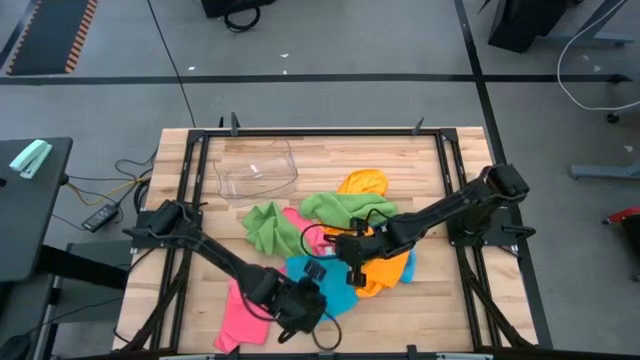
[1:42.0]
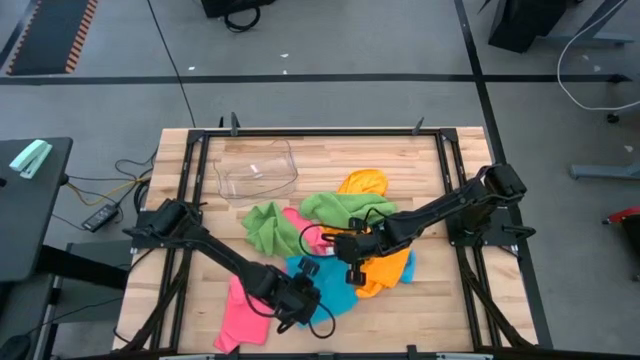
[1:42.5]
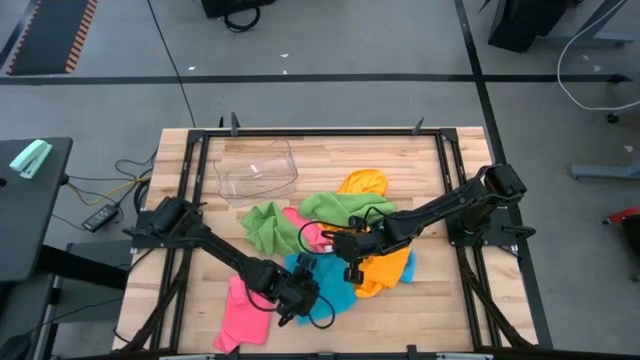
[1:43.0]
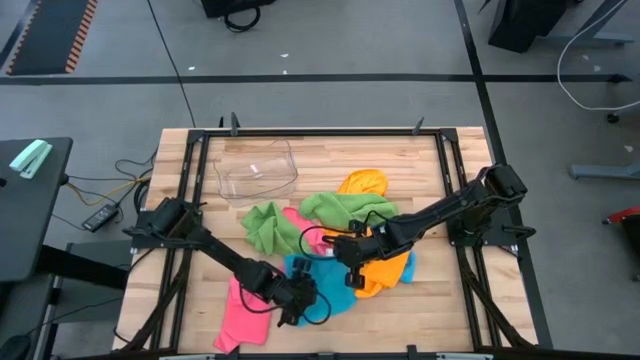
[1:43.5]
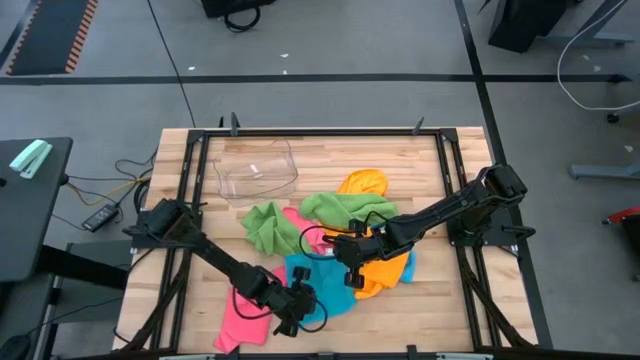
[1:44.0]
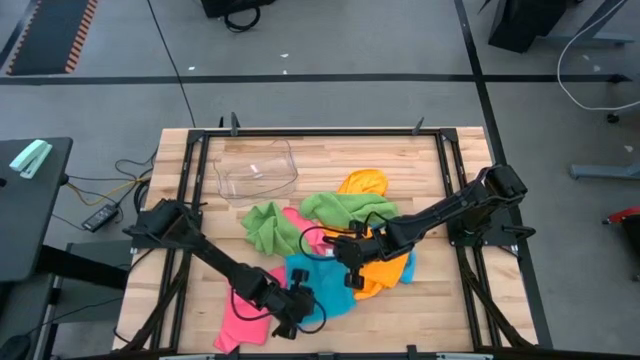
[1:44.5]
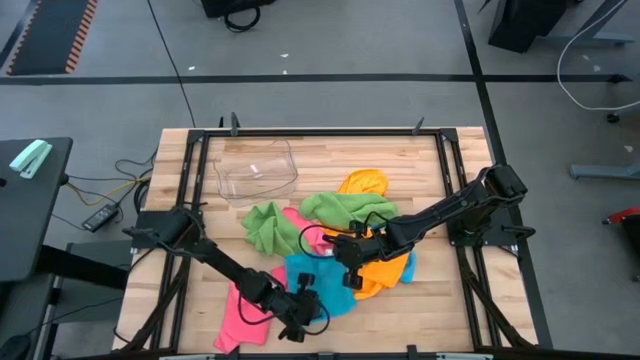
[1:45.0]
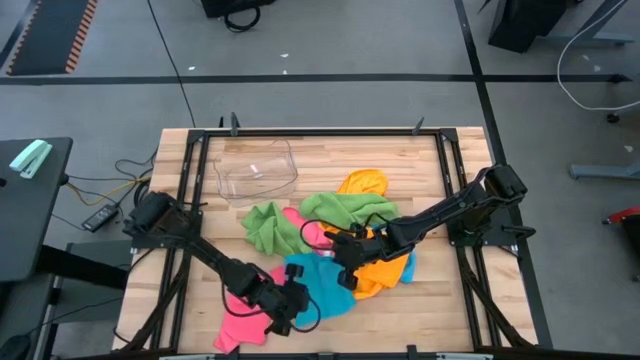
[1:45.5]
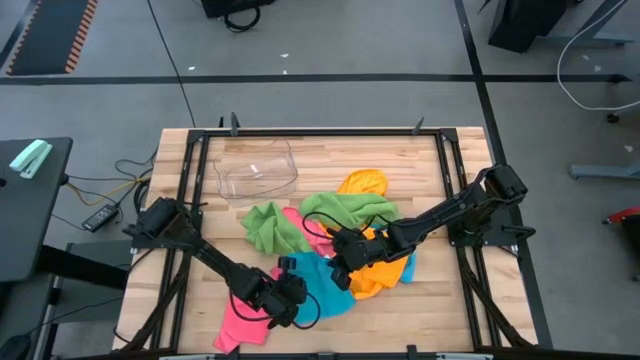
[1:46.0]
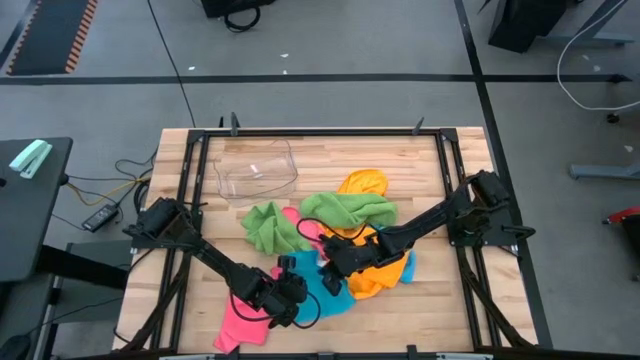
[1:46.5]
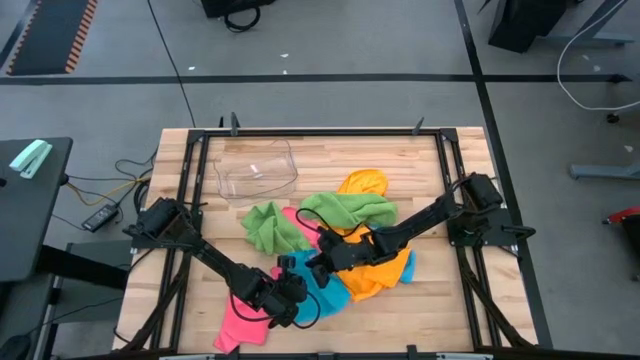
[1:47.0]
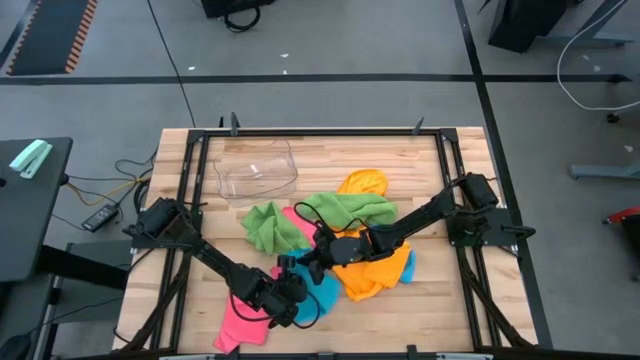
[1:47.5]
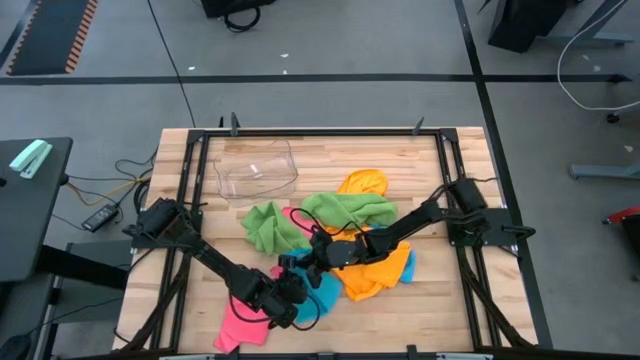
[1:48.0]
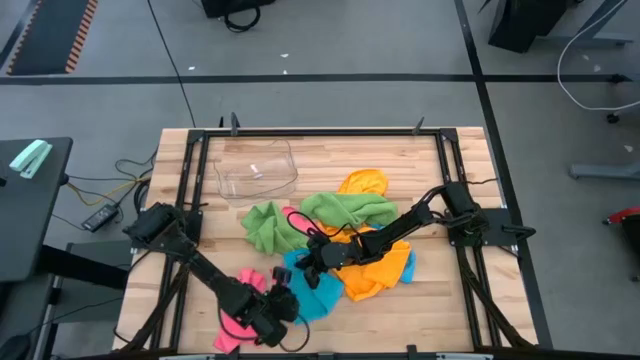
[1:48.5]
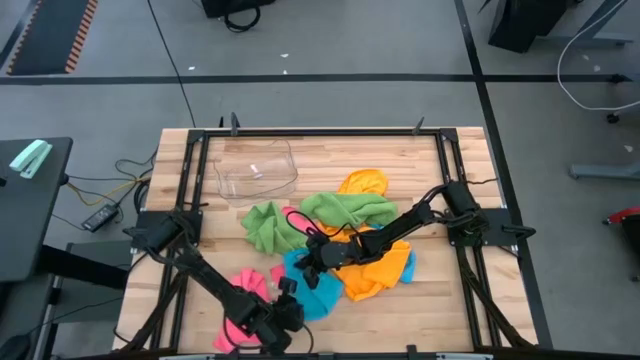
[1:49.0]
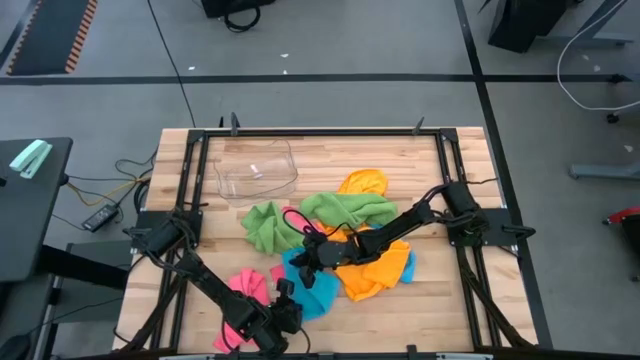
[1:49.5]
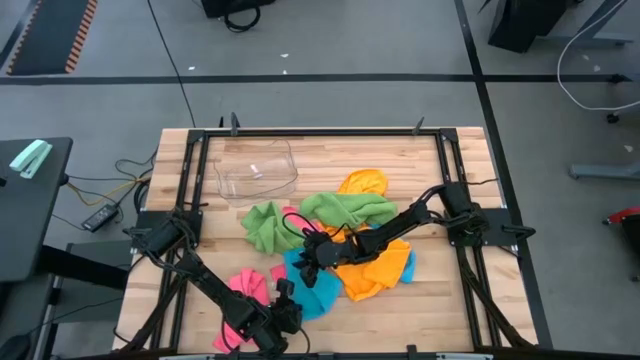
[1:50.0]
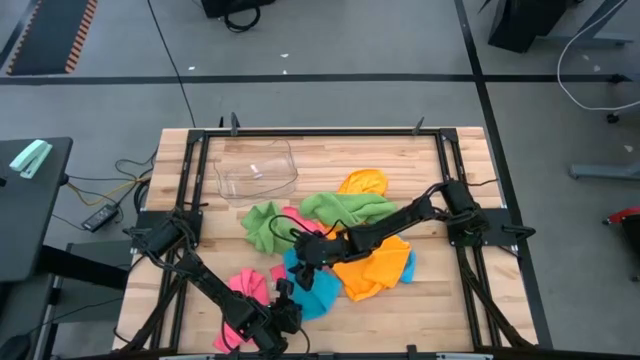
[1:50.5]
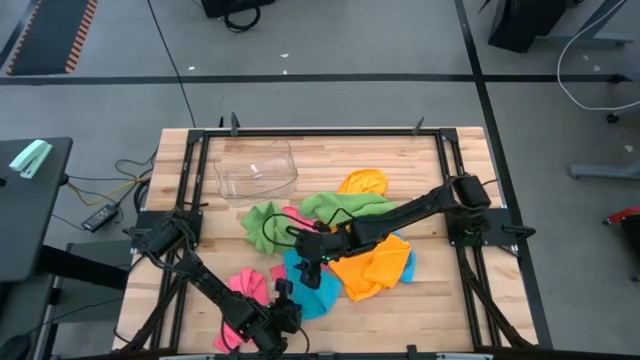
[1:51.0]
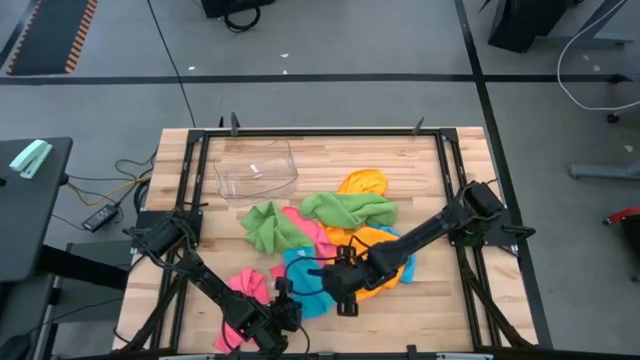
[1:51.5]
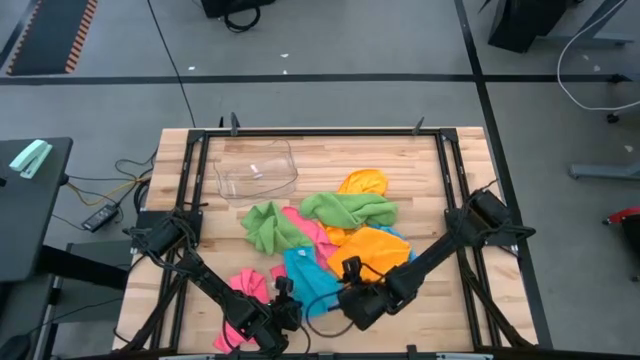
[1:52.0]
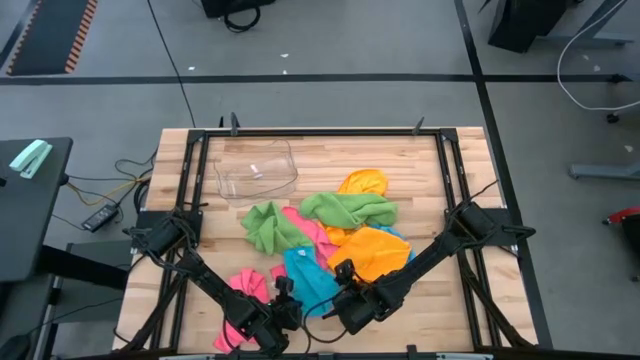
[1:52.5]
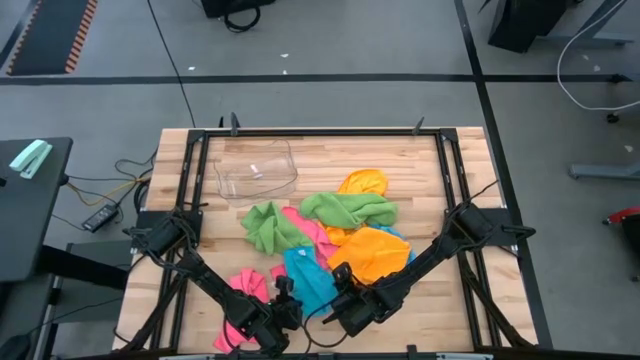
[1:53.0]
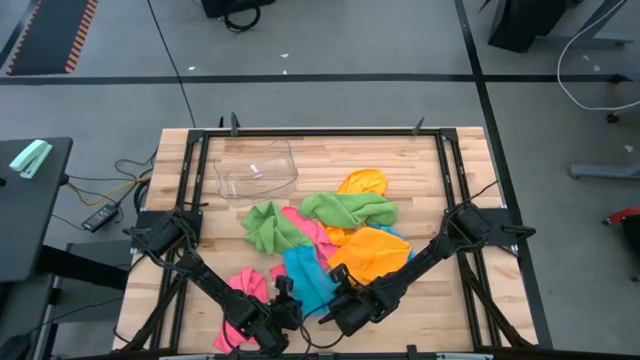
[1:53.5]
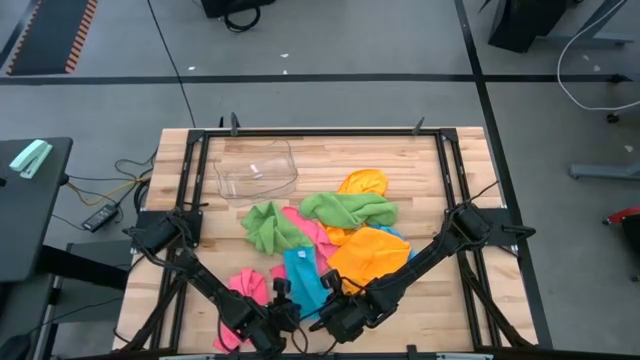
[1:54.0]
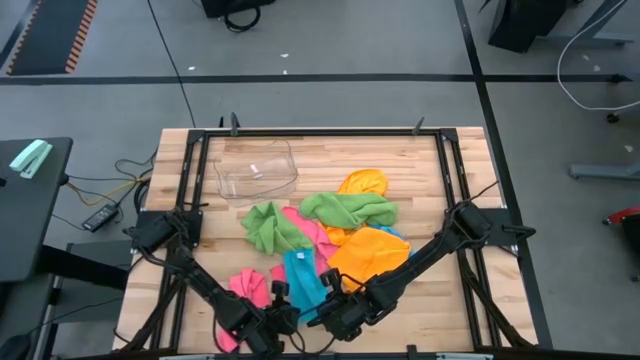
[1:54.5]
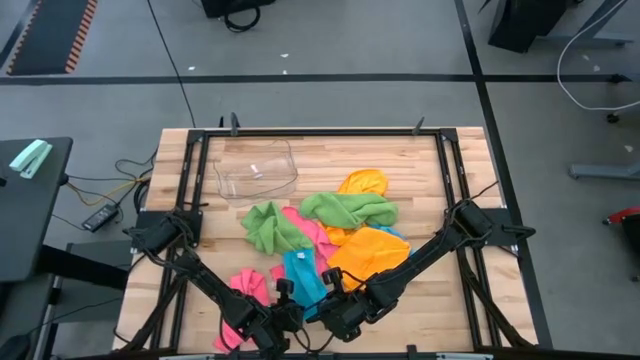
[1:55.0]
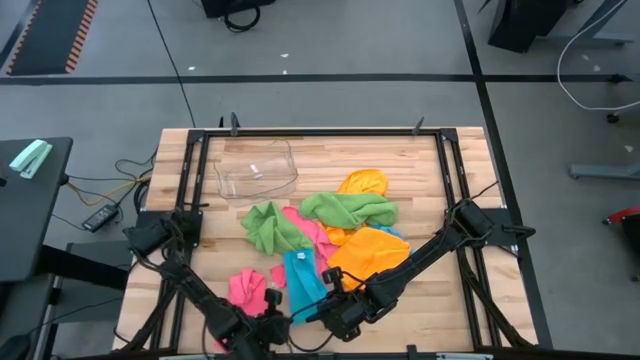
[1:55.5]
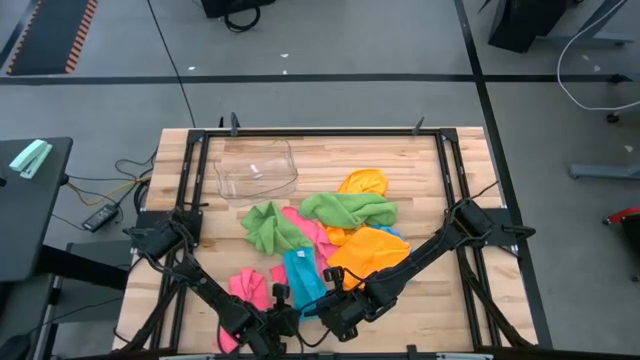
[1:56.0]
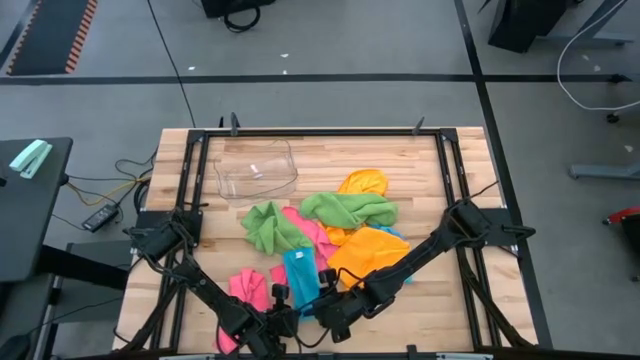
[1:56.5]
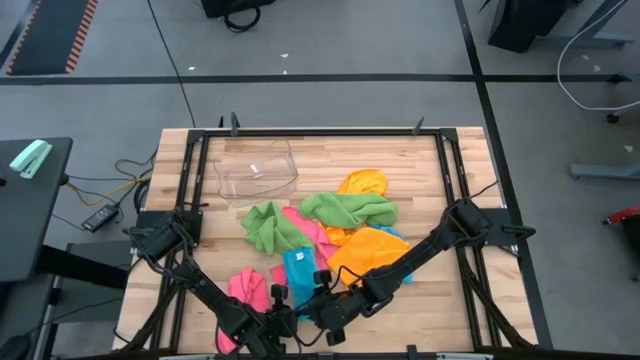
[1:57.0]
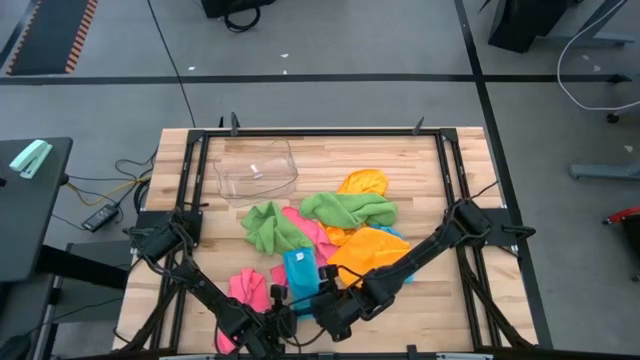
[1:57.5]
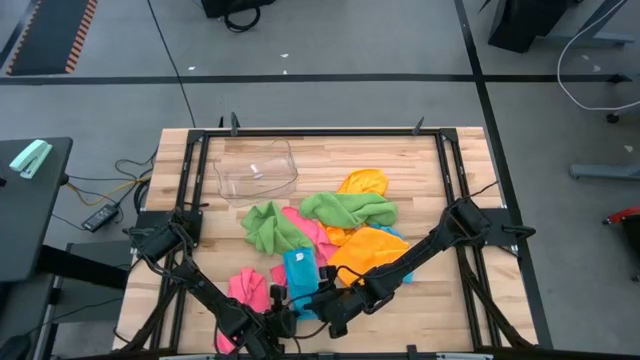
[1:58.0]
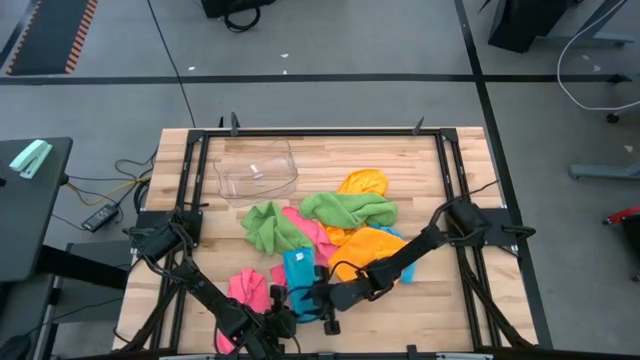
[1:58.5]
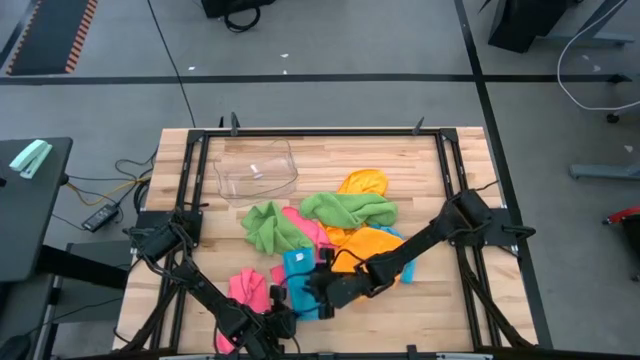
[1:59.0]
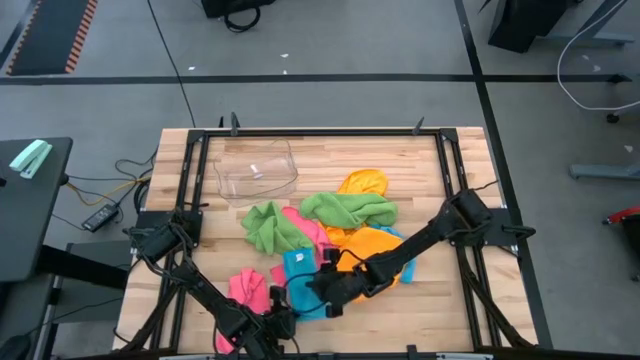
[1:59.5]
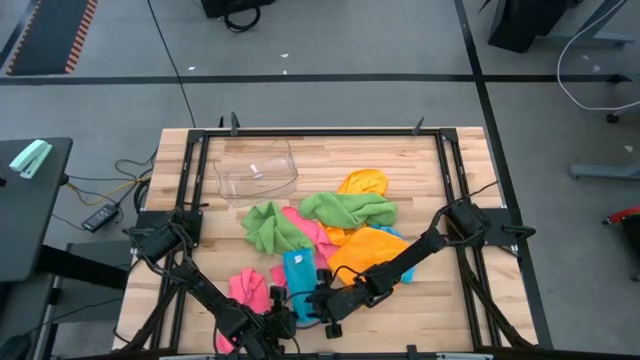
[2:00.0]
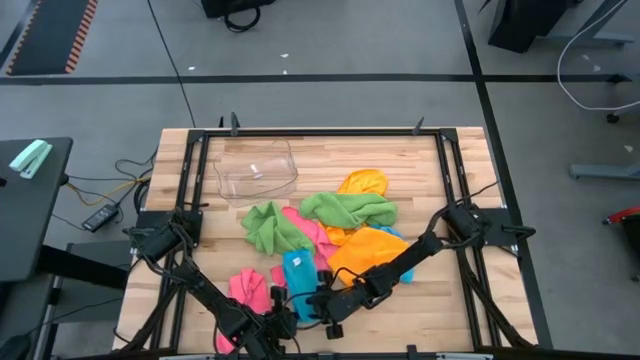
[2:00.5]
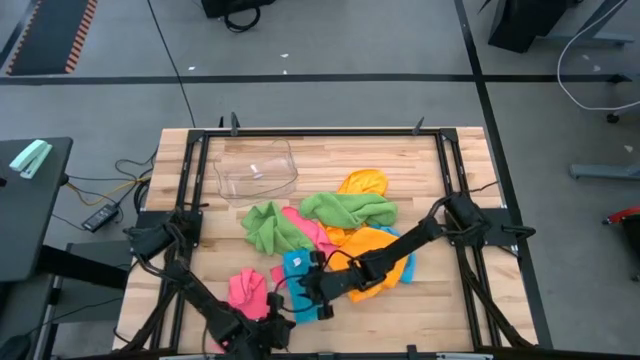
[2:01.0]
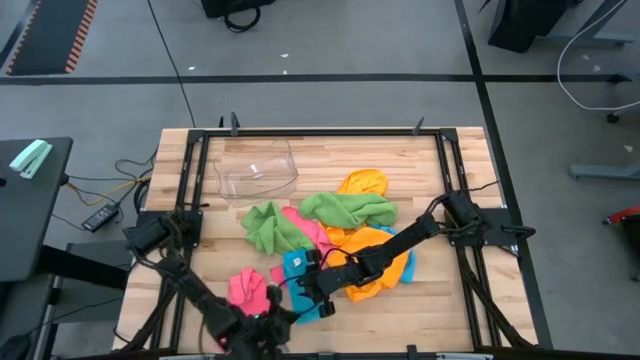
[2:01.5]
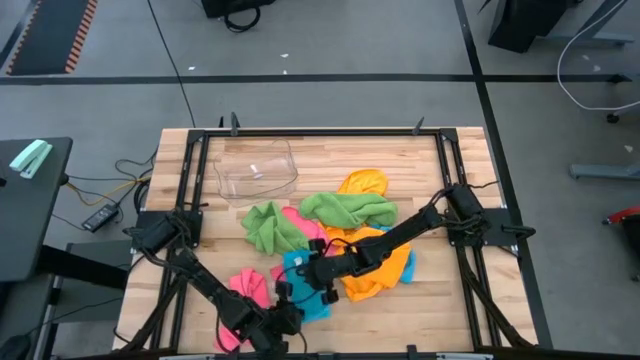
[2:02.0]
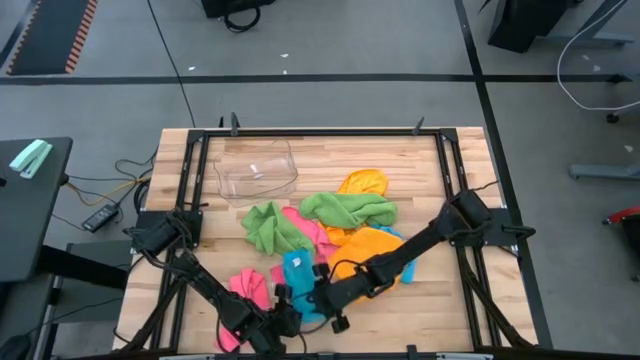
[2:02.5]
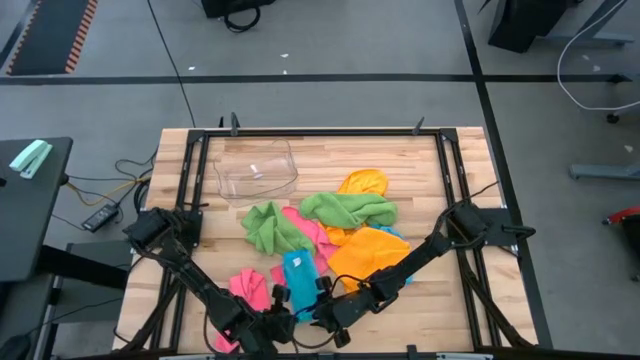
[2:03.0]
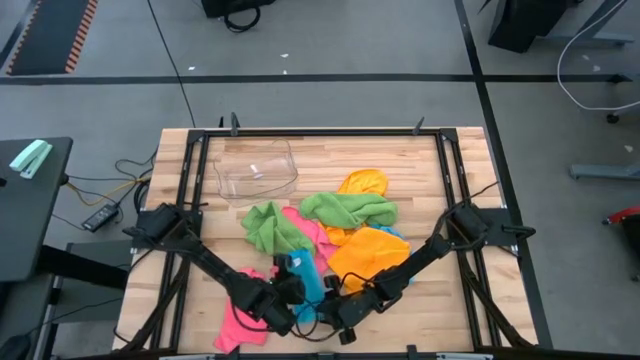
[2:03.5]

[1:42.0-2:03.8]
Task: Fold microfiber towels
Fold the left blue microfiber towel
